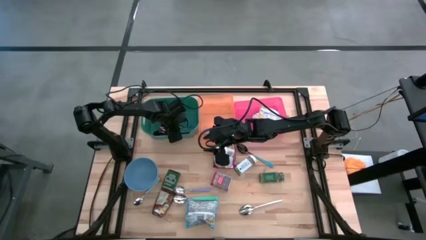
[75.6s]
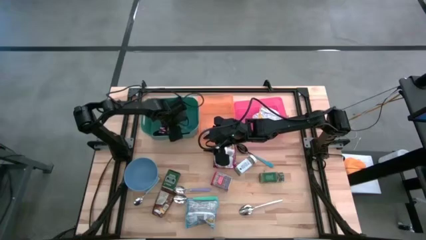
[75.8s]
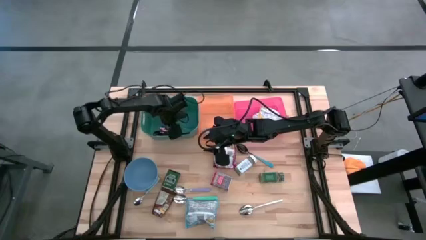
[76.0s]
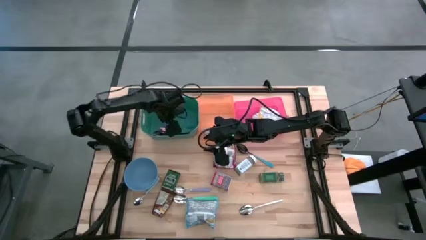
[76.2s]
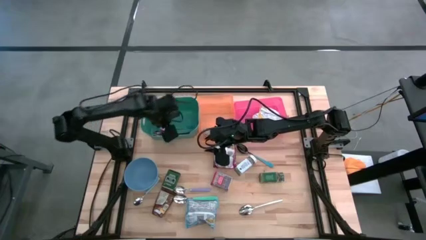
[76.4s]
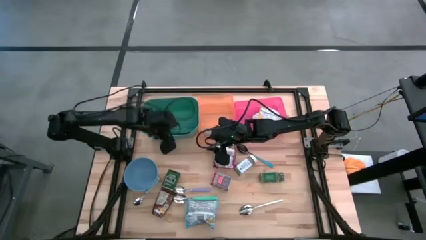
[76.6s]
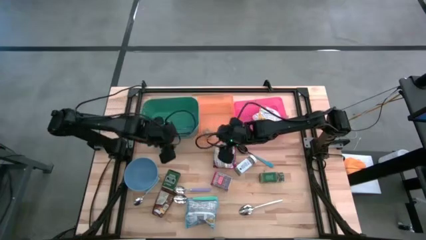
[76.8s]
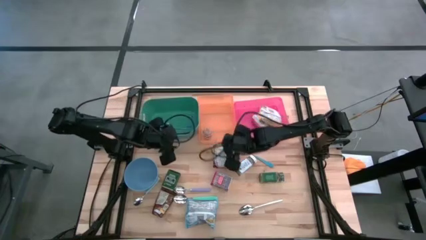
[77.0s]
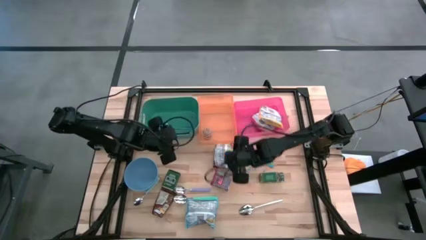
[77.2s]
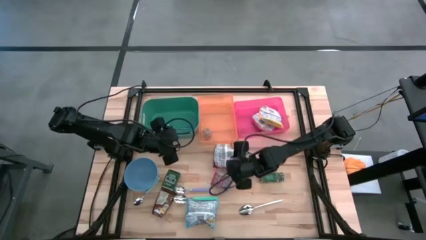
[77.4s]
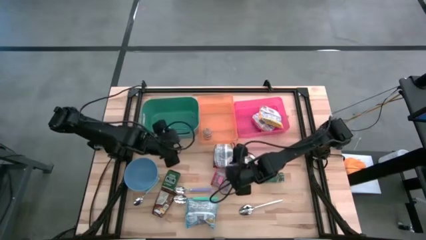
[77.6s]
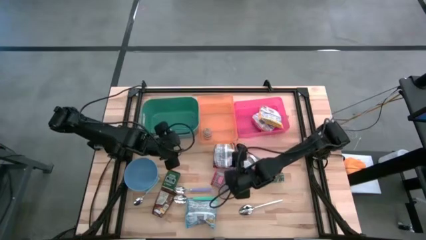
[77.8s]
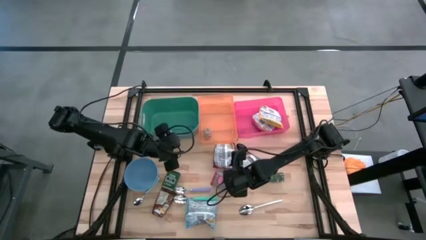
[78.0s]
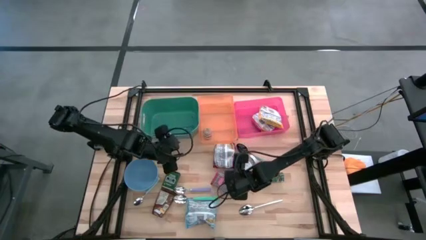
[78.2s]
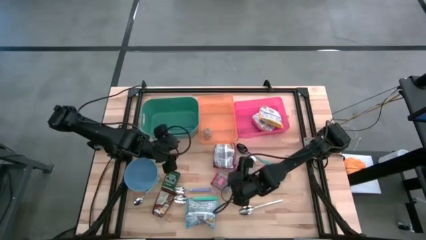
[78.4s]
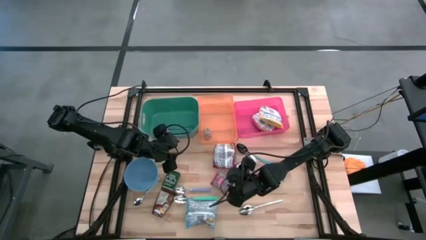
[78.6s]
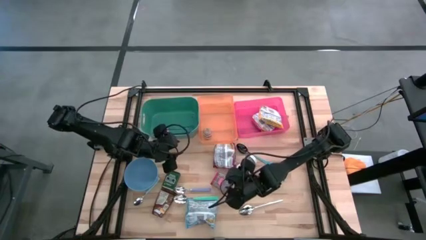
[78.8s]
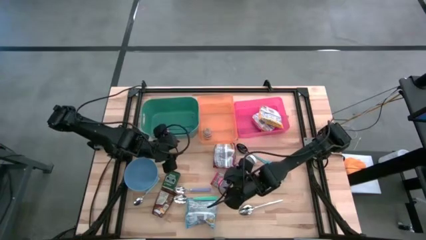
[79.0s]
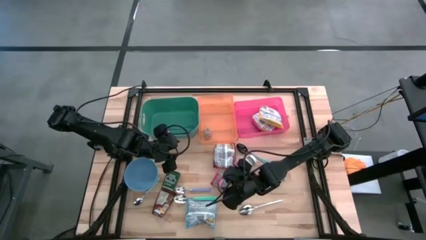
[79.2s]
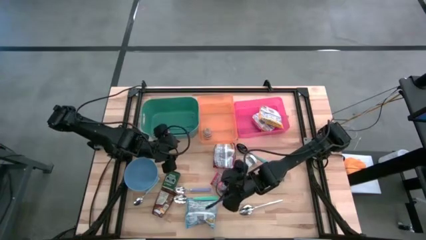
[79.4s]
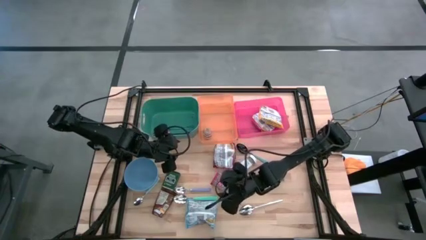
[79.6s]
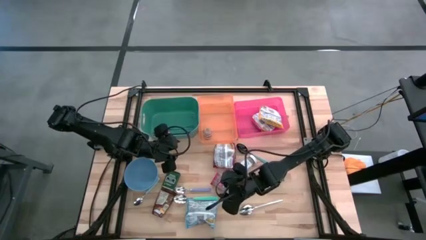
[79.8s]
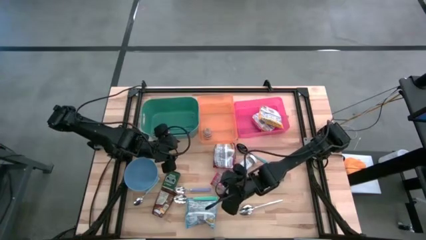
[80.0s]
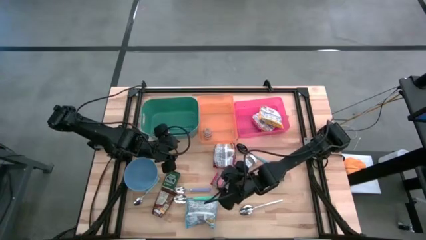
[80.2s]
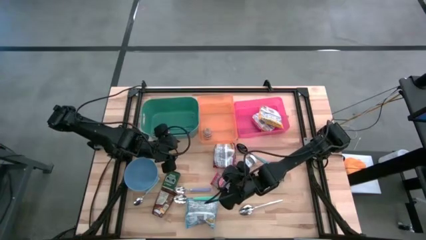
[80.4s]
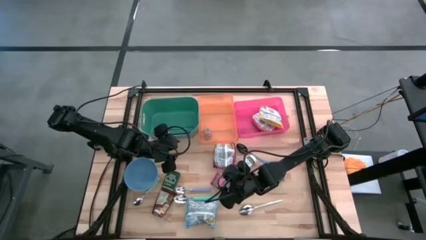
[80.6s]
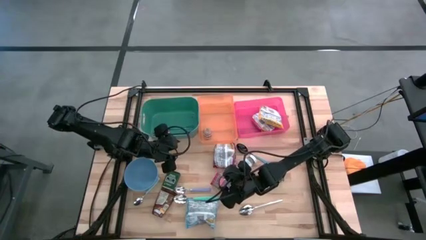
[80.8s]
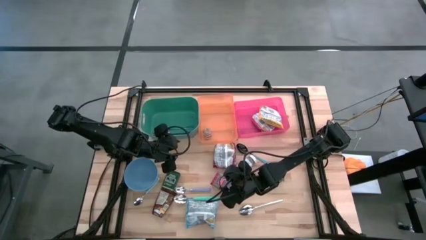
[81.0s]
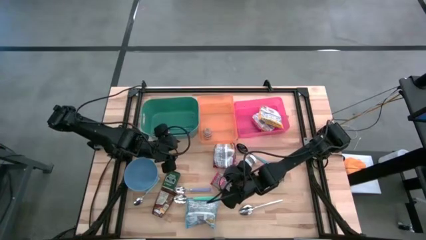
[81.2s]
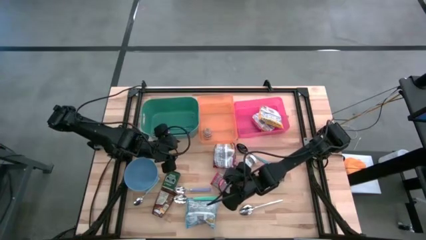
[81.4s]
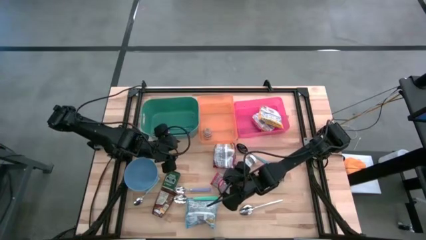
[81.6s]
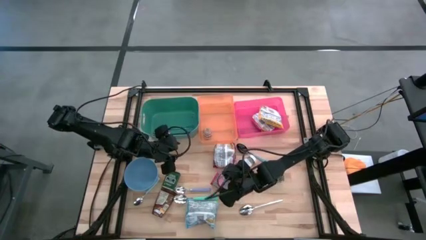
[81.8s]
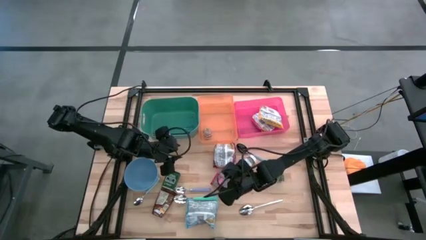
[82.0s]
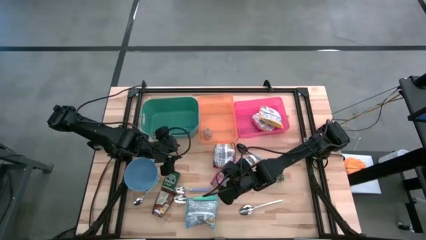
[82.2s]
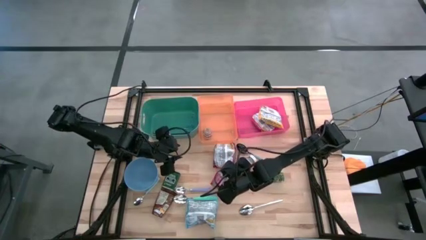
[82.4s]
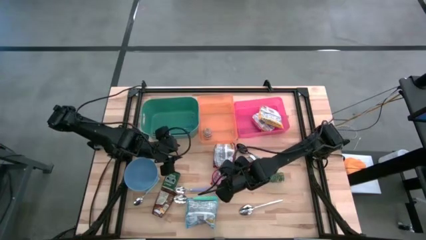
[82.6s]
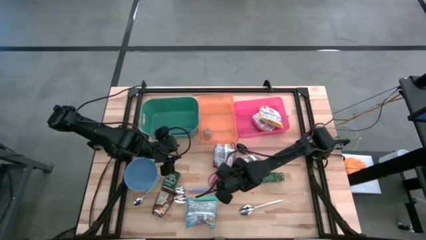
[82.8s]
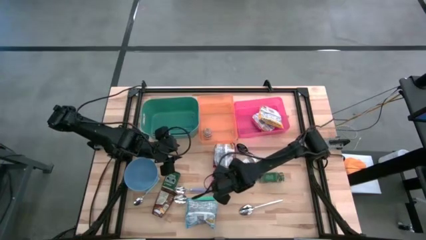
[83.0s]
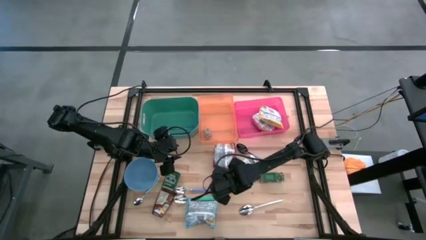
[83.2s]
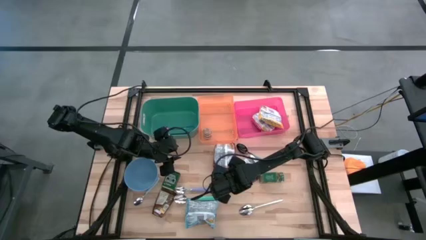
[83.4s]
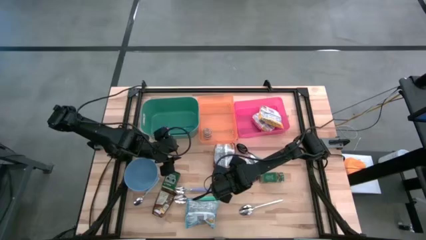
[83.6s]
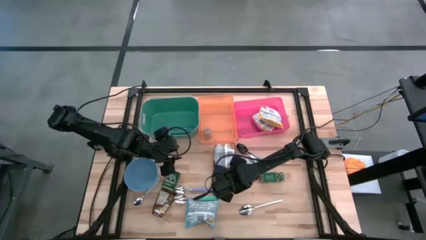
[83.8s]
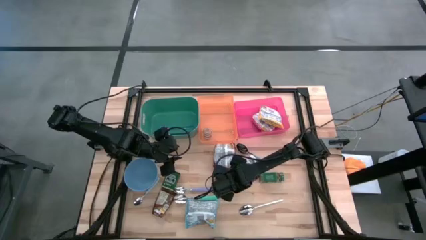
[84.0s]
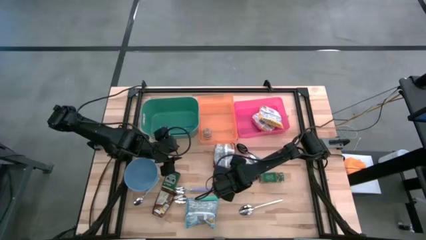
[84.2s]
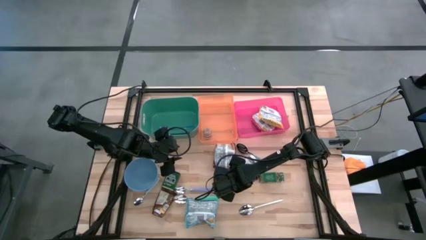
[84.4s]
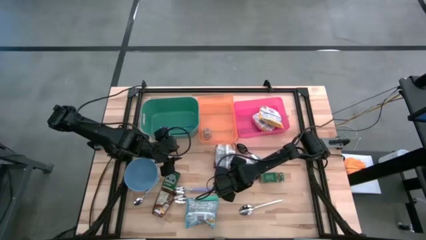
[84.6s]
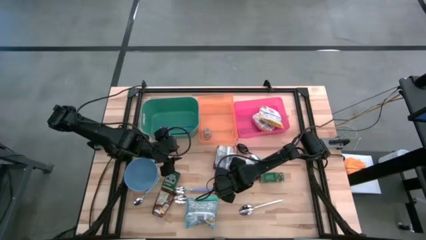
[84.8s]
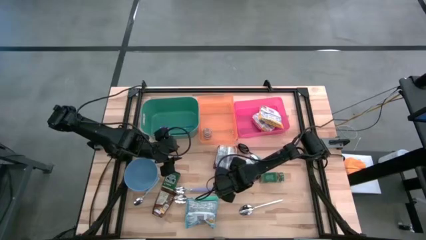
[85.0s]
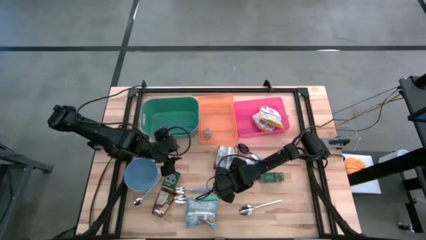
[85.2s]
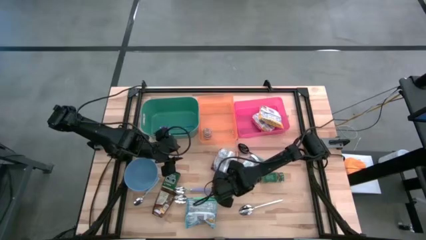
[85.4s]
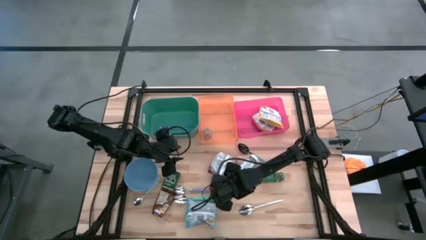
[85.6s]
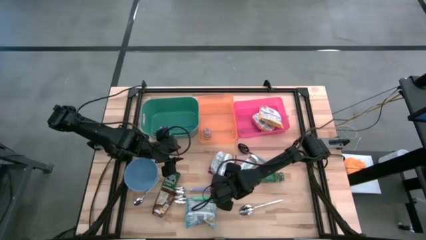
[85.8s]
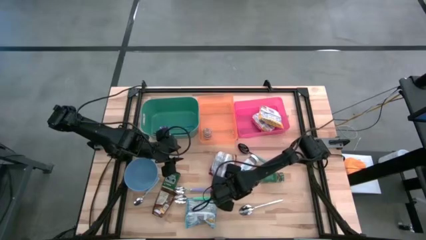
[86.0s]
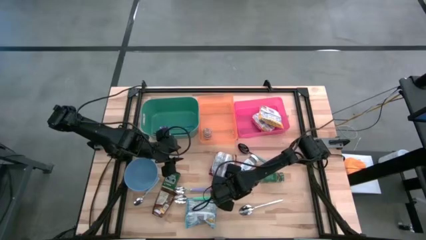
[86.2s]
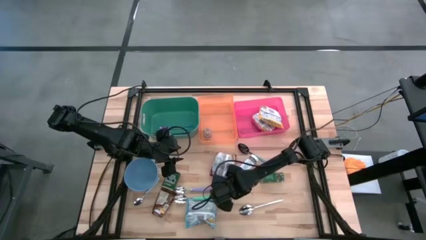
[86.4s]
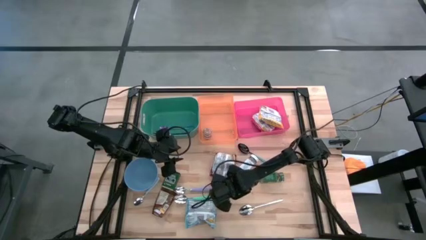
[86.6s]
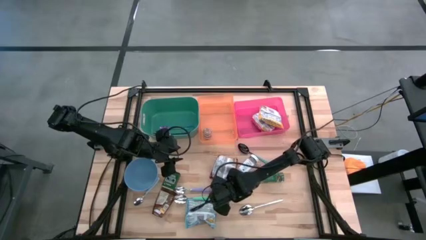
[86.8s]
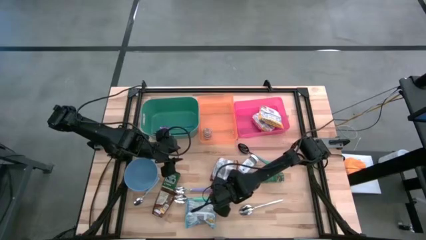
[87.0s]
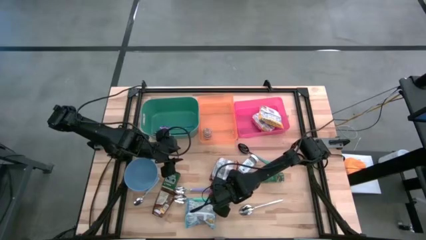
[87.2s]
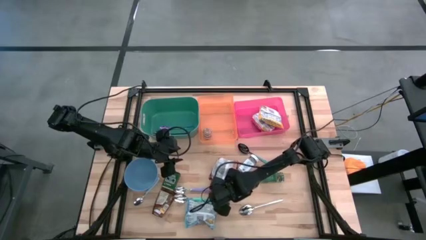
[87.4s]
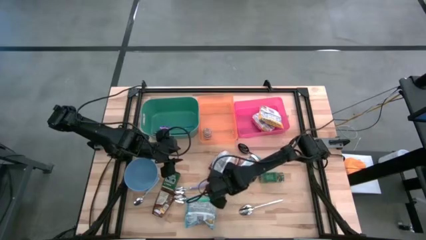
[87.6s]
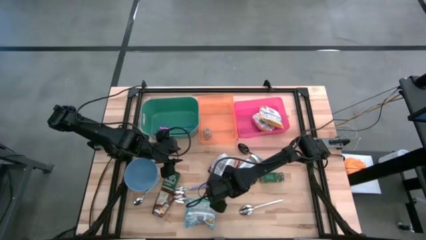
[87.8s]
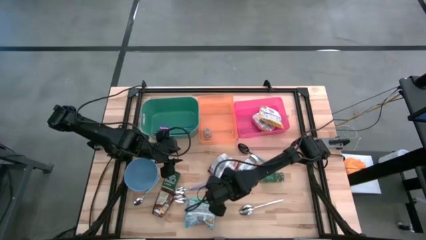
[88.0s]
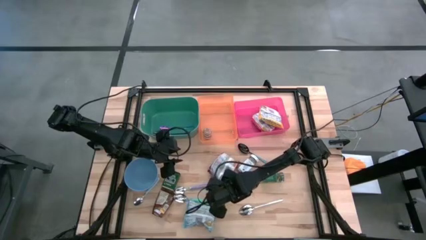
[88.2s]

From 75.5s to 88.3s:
Put the red seasoning can into the orange bin
